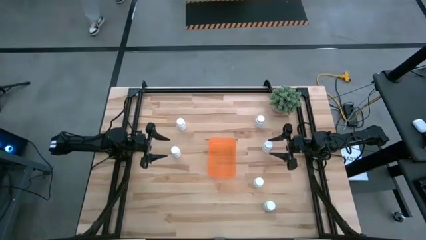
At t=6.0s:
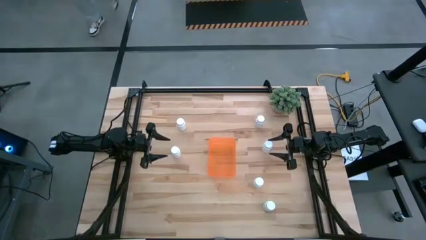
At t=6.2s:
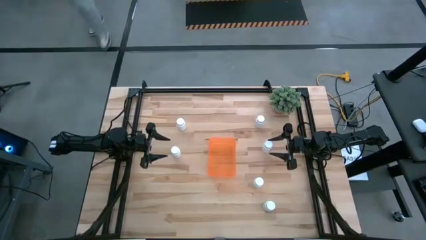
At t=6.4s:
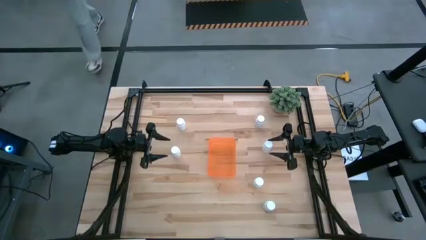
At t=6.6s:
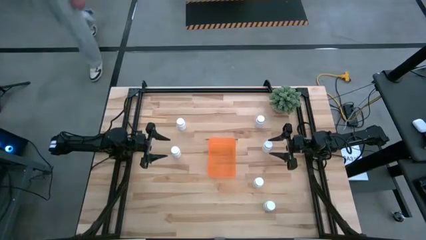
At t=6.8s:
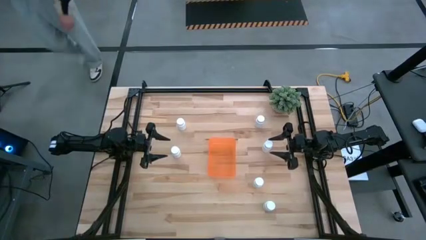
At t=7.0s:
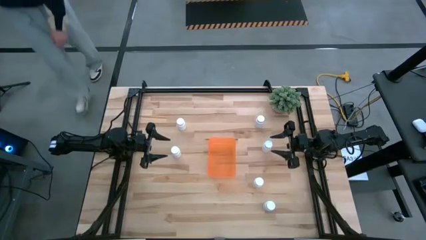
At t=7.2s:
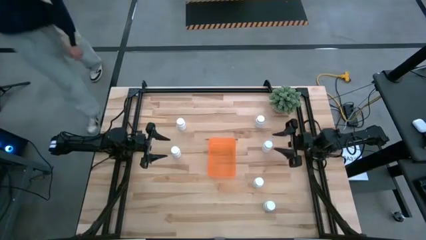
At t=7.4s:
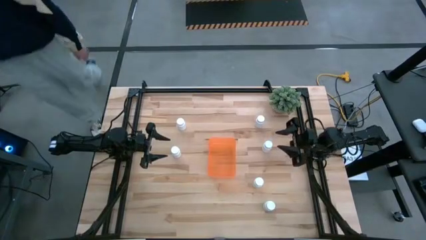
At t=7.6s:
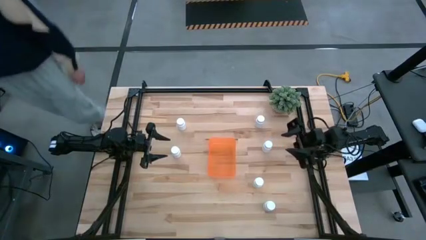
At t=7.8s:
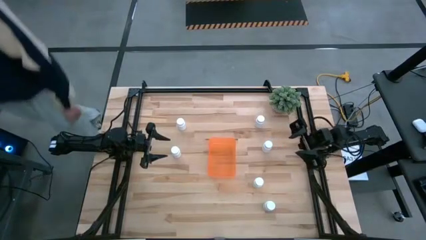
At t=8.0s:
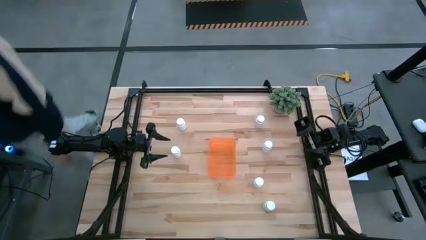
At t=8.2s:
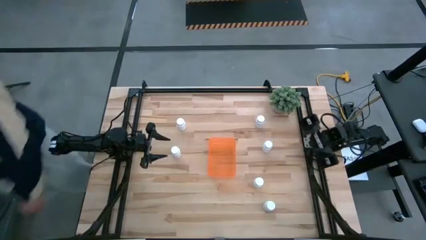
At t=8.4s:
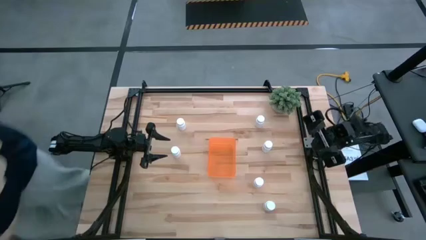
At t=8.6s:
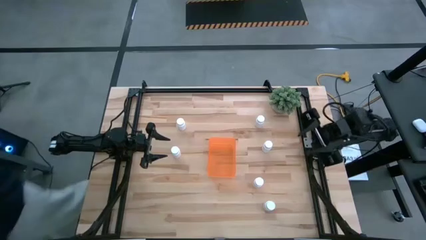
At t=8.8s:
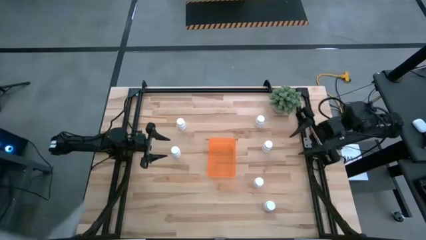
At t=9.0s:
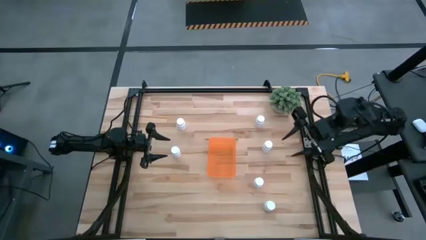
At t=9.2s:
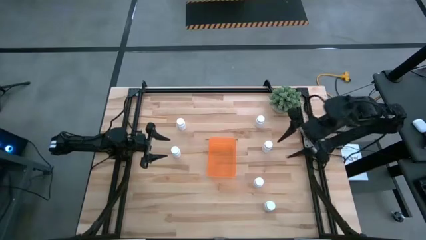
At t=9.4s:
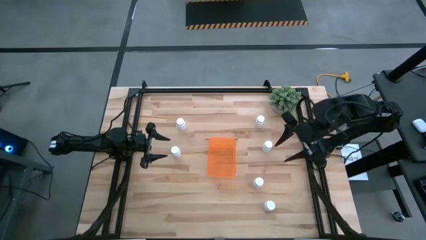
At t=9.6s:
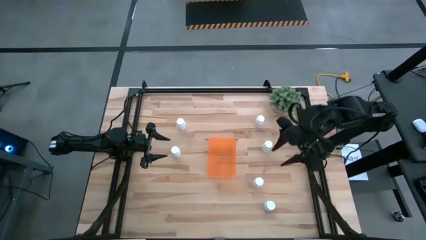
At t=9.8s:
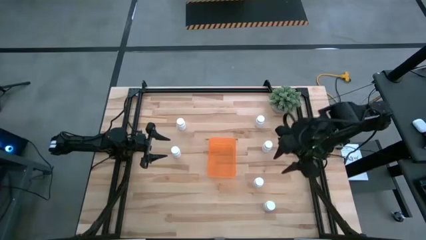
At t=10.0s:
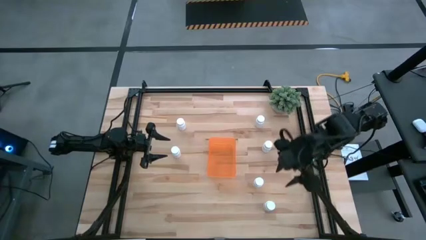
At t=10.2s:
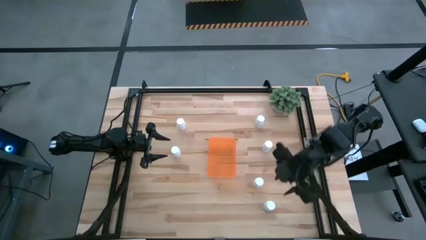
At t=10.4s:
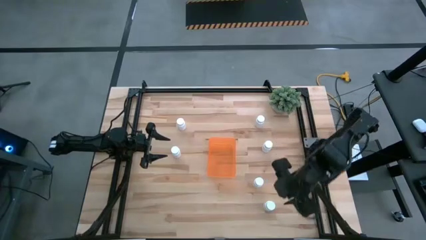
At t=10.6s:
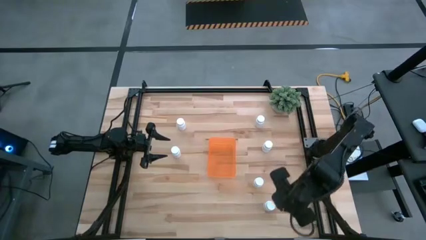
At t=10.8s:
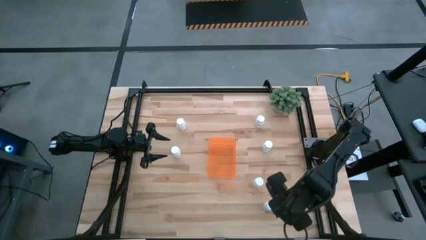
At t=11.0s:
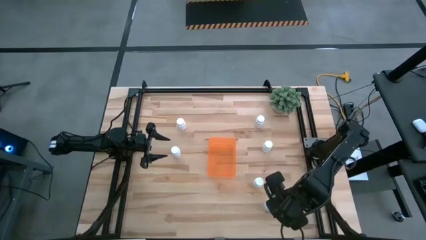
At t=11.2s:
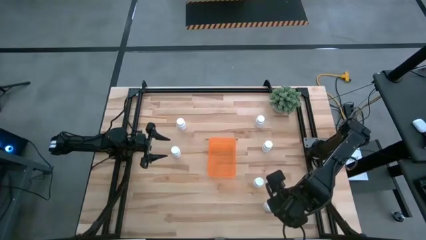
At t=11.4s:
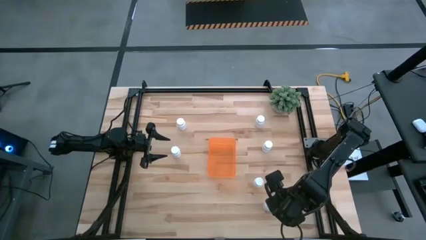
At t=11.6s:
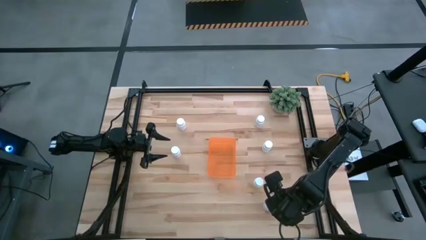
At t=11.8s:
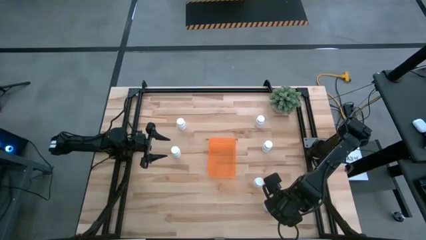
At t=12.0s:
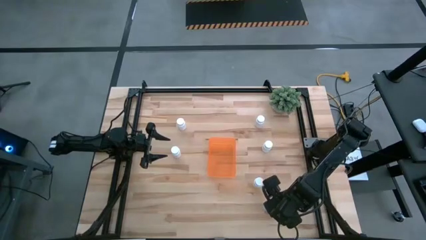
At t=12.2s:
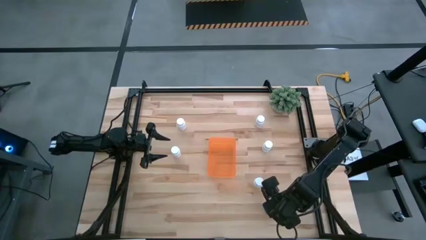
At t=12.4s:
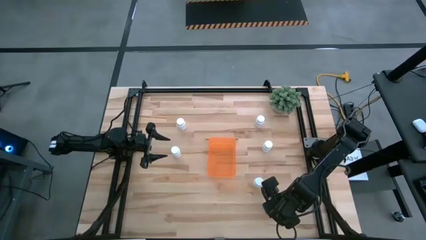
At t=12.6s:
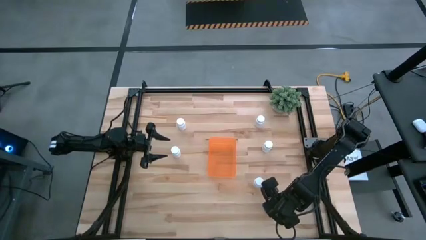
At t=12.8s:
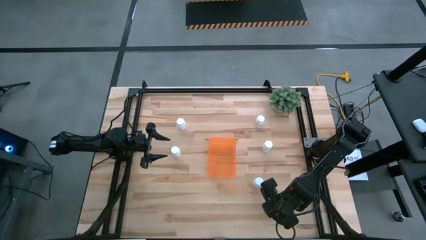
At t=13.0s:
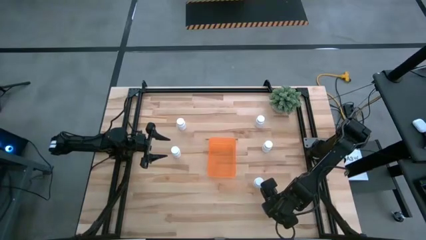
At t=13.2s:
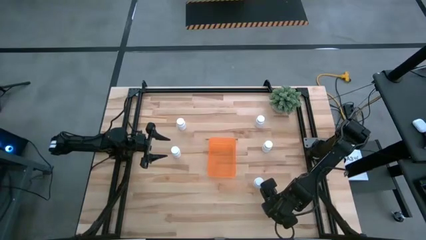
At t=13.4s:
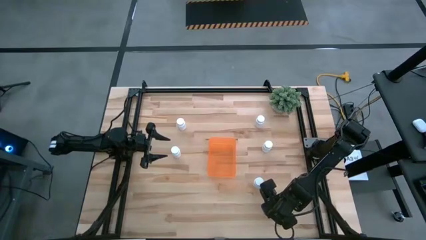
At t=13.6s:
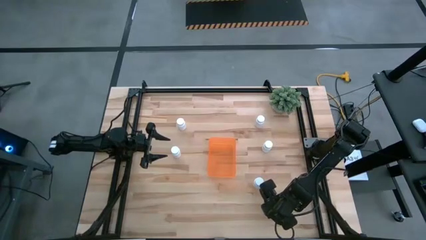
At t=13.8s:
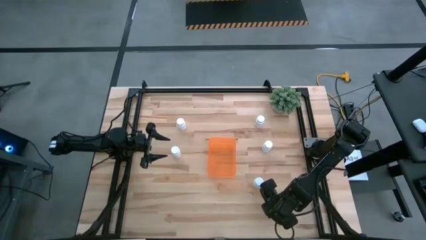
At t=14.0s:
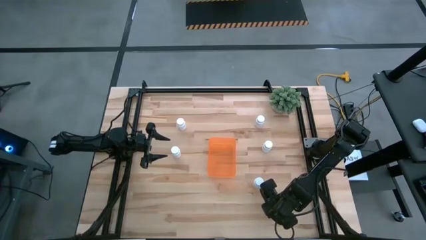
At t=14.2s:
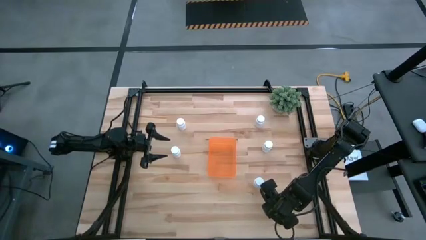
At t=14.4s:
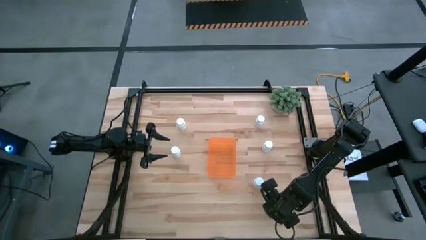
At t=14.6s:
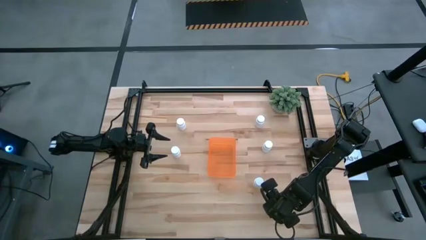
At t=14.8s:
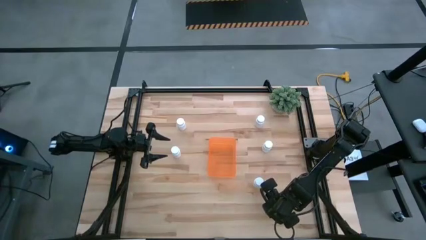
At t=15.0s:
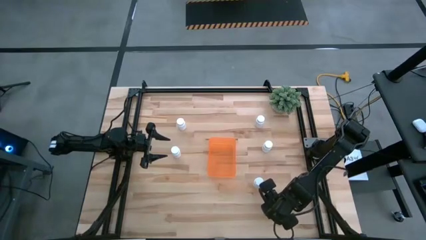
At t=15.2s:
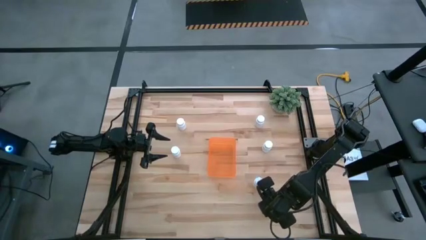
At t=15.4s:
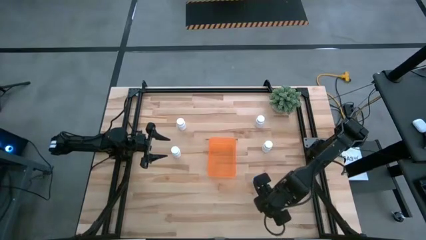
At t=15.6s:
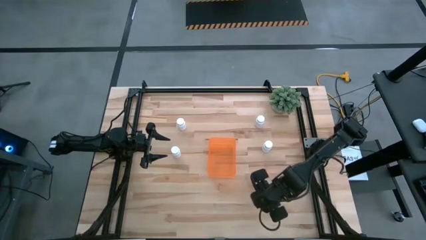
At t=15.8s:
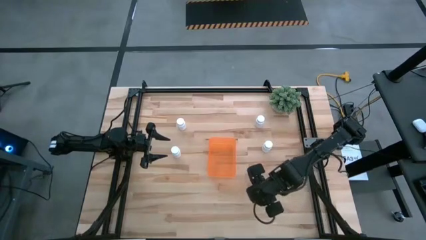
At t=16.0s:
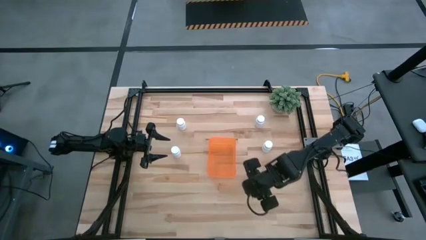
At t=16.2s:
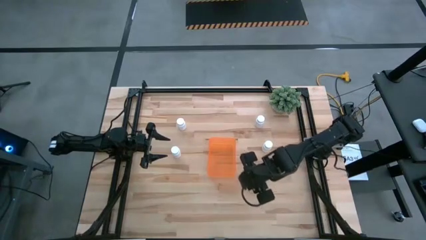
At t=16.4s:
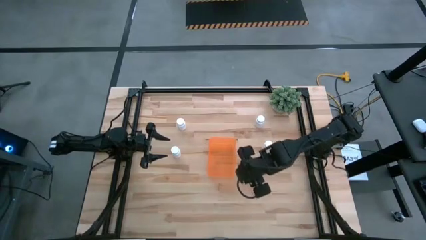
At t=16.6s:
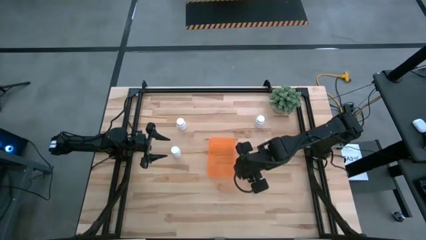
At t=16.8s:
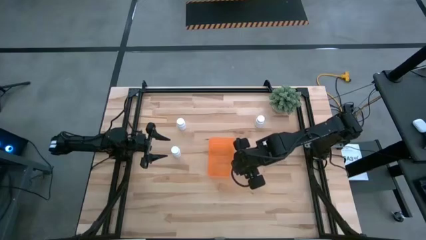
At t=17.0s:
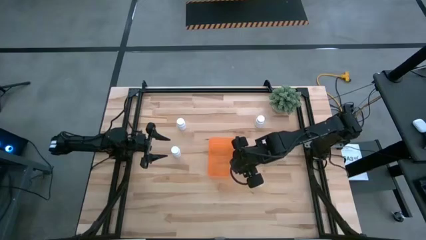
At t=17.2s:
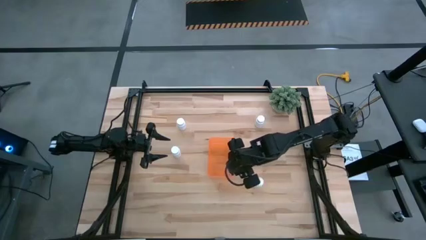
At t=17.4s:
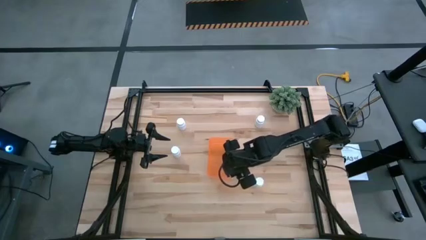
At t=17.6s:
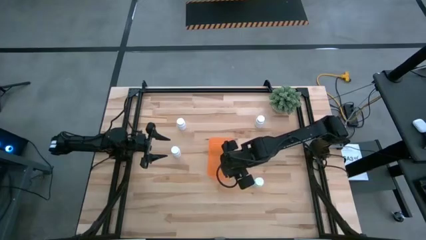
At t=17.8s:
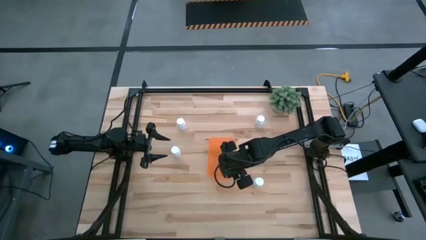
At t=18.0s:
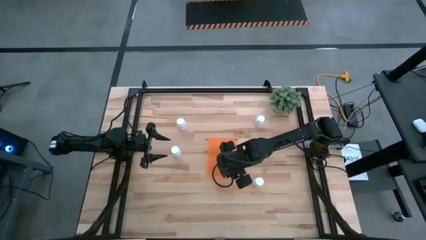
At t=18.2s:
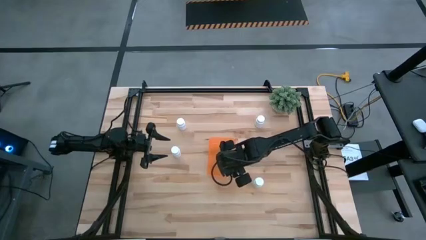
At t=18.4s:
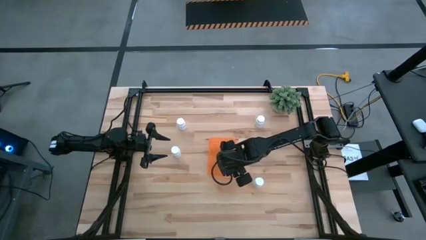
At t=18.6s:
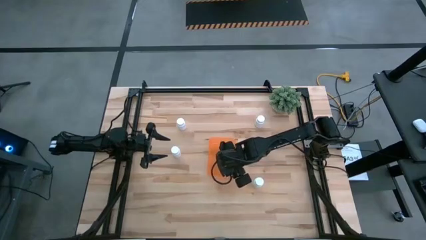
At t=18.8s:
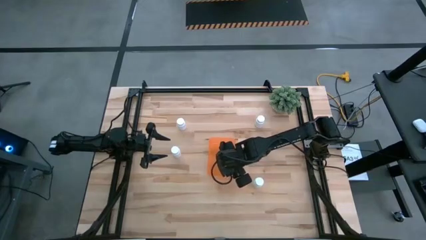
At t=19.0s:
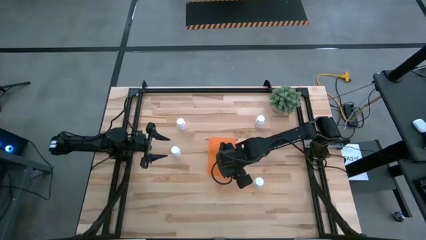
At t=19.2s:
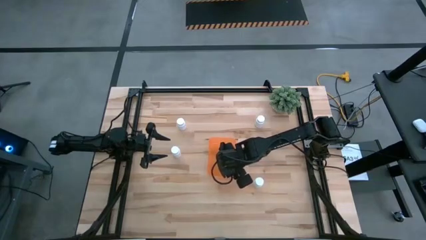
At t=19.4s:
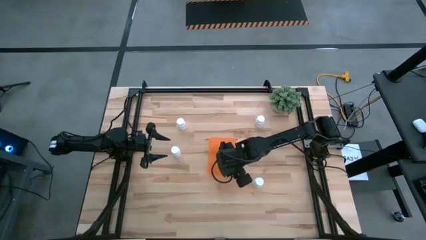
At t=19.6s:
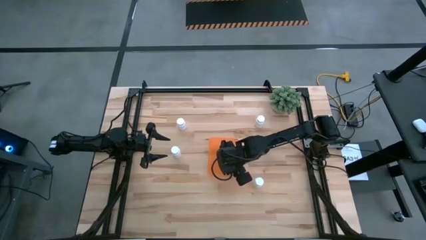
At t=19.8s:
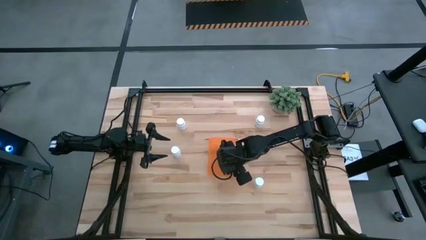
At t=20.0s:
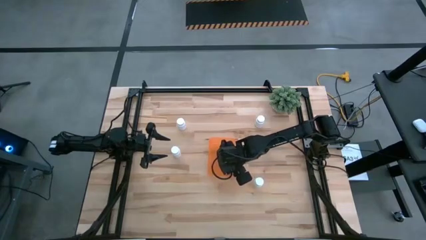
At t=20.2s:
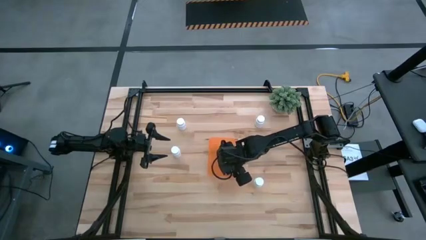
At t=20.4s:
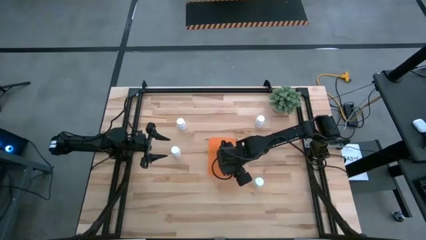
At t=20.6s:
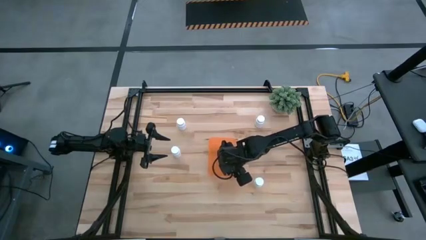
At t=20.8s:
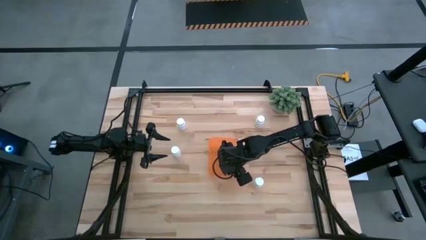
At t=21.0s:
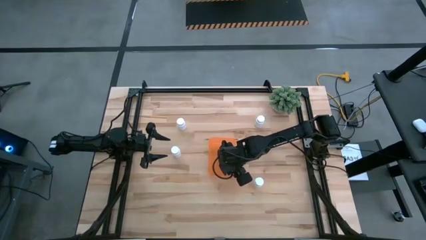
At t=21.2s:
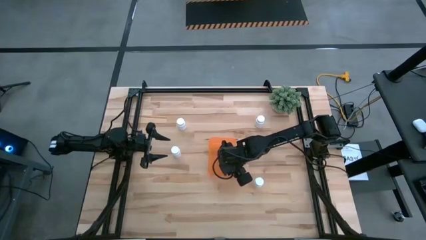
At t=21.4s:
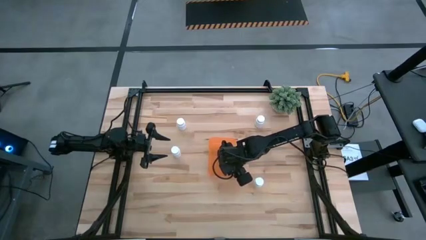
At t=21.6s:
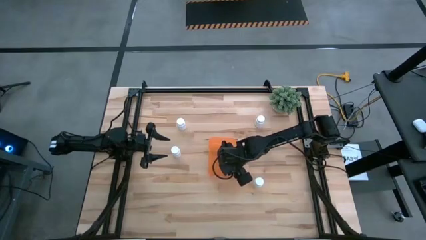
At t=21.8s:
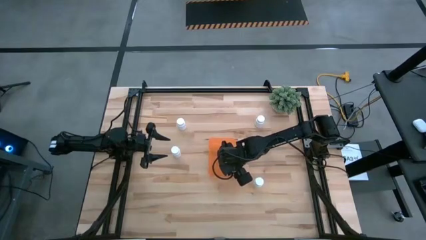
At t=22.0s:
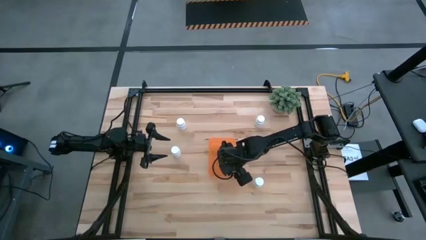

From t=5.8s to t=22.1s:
Task: Pick and place pill bottles into a basket
Put the white pill bottle into the orange bin
